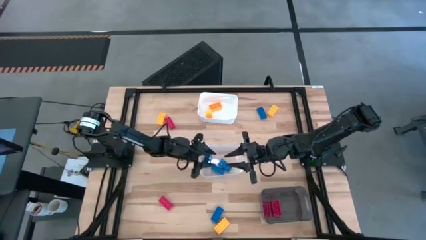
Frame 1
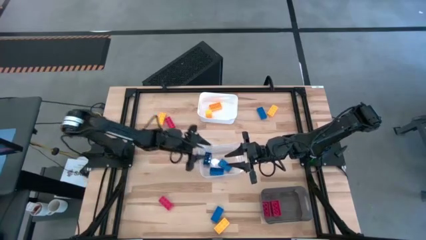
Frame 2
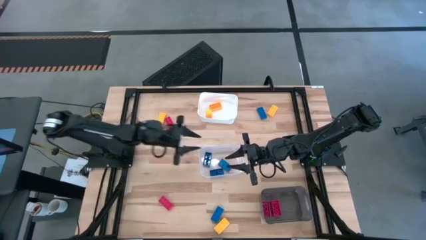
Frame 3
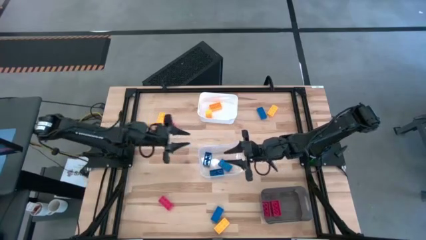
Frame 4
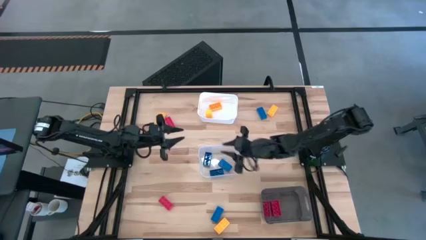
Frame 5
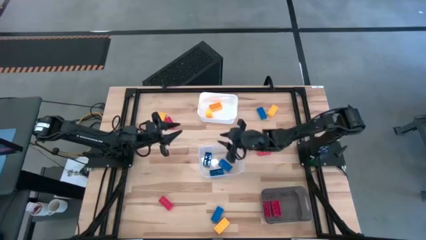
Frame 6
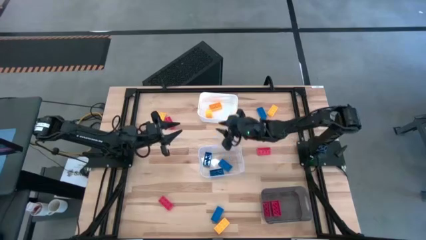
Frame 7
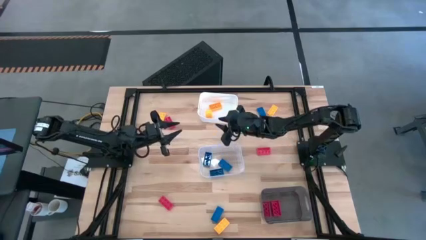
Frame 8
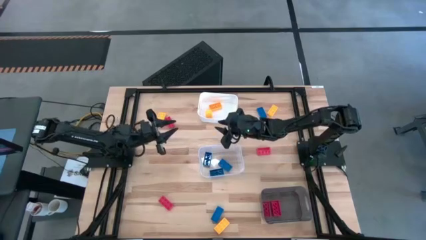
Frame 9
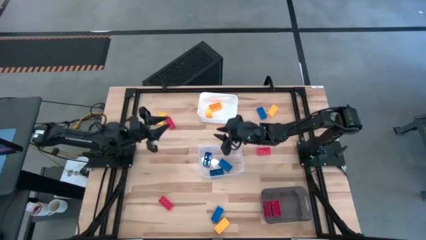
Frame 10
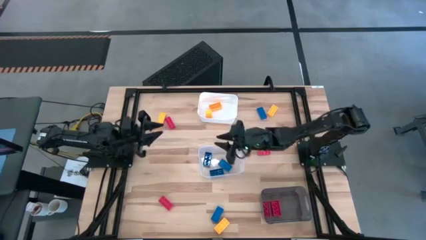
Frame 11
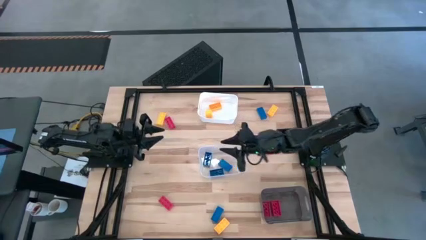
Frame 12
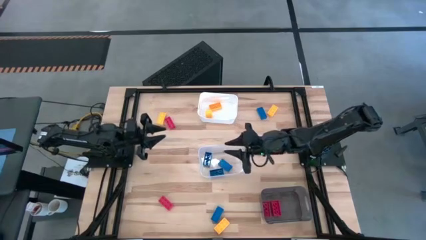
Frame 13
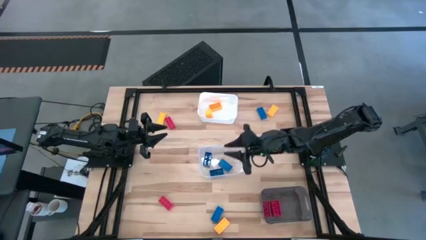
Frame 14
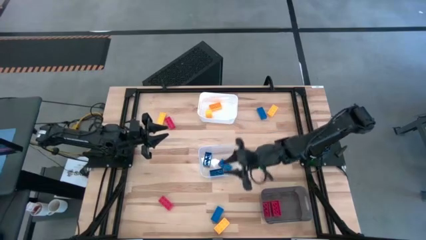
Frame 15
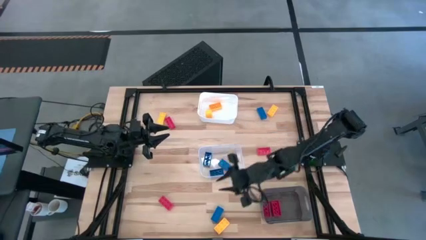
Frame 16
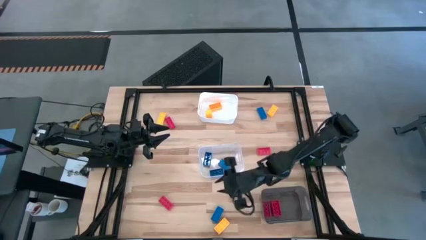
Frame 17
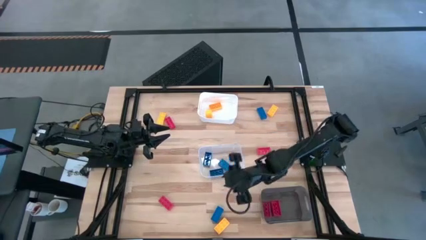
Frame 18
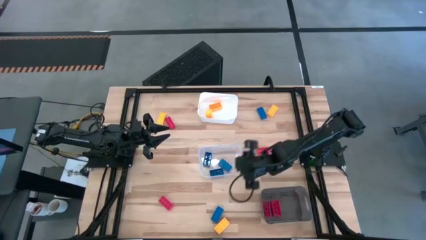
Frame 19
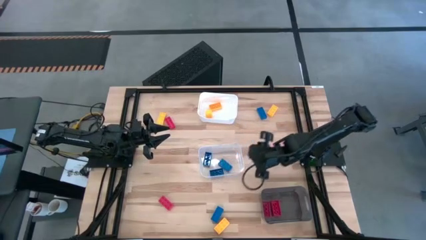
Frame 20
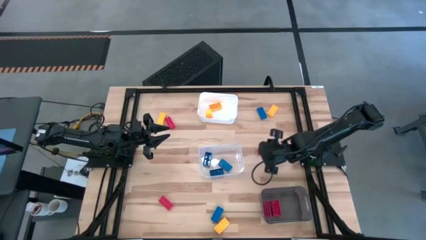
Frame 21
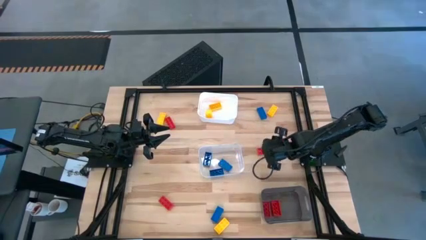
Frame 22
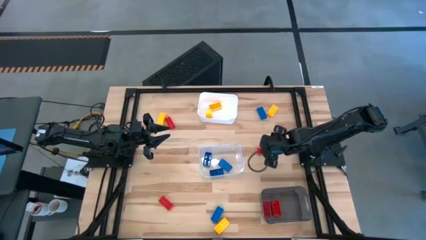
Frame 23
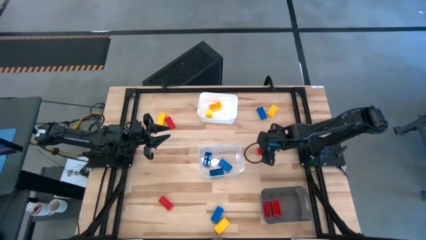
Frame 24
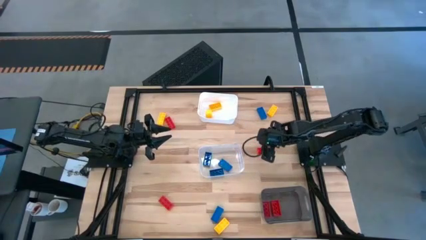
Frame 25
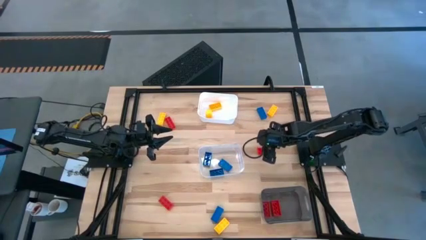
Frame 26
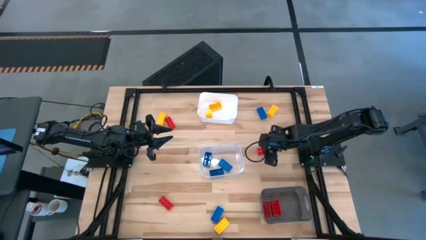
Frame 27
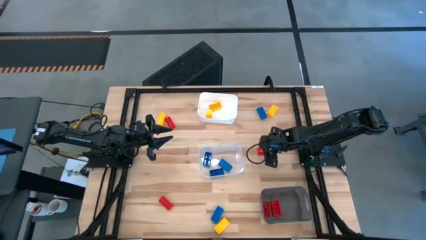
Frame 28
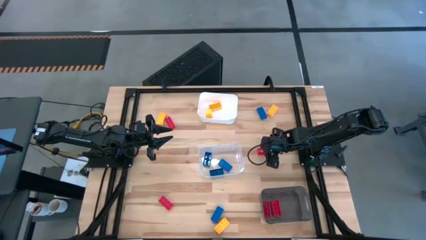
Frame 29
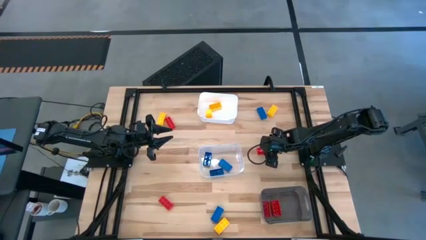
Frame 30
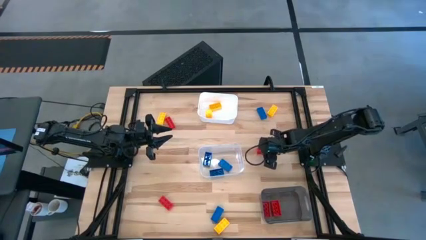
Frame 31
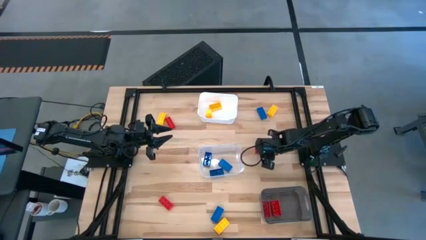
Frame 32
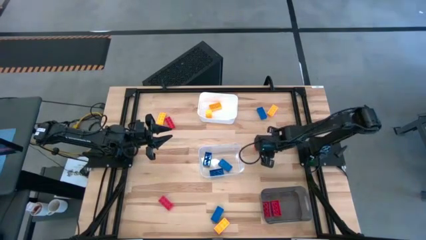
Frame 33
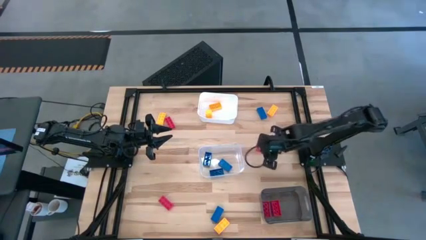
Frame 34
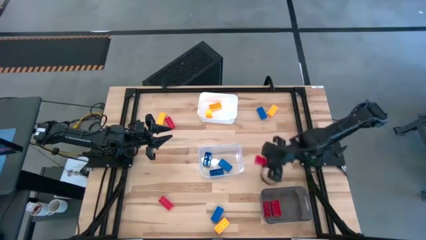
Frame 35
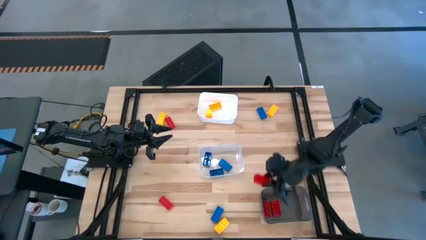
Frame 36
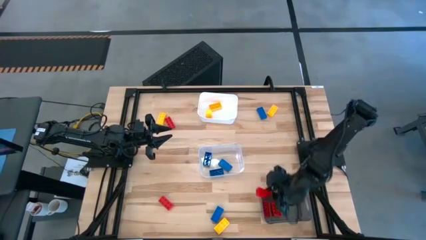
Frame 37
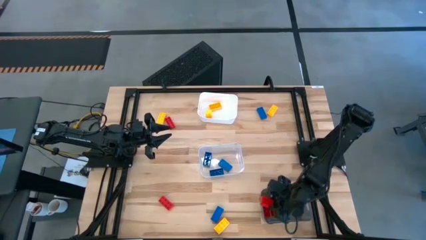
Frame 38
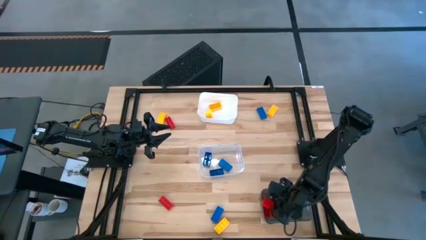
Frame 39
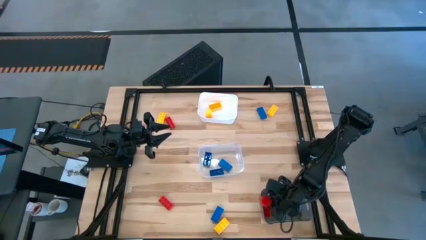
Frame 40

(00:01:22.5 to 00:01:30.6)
Task: Sort & place blocks by color
Put the red game piece into the black bin

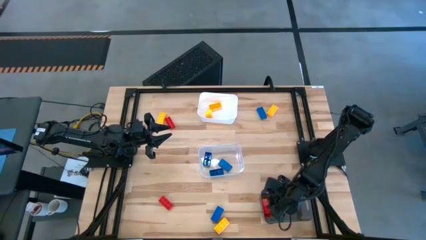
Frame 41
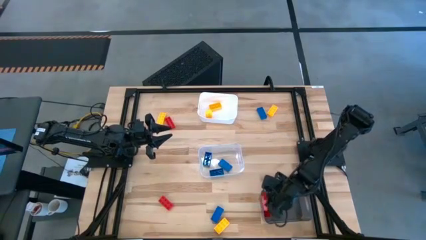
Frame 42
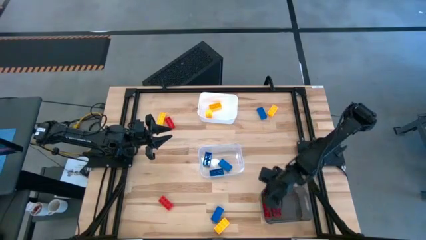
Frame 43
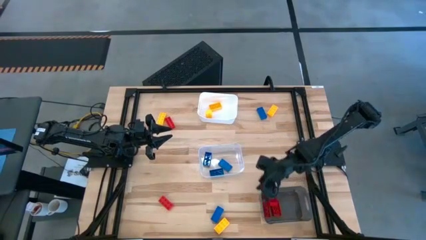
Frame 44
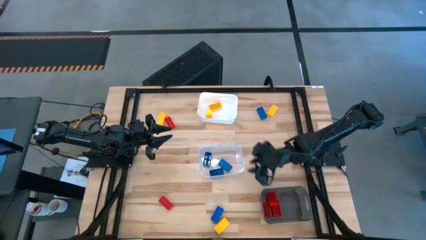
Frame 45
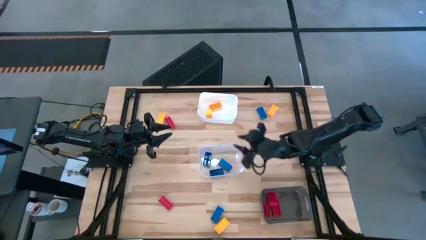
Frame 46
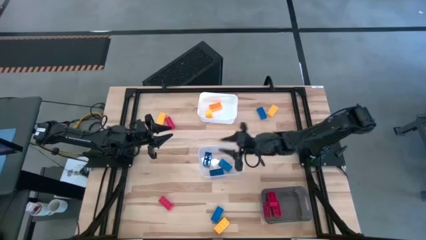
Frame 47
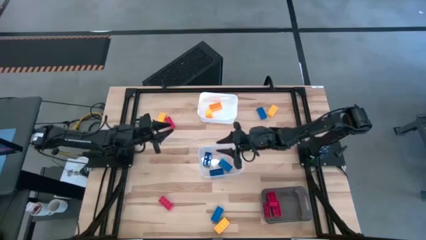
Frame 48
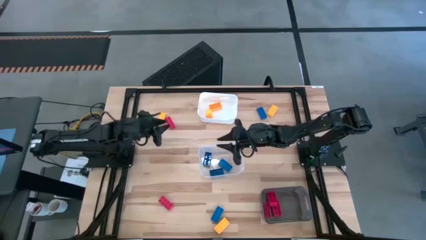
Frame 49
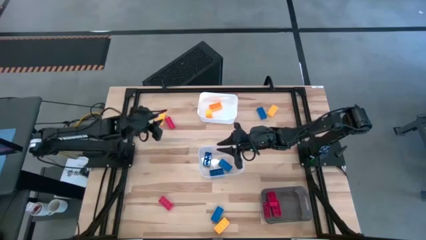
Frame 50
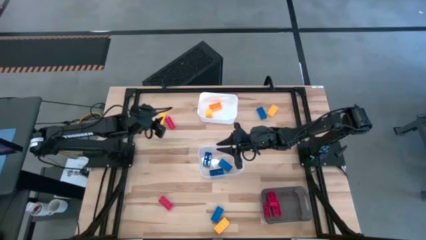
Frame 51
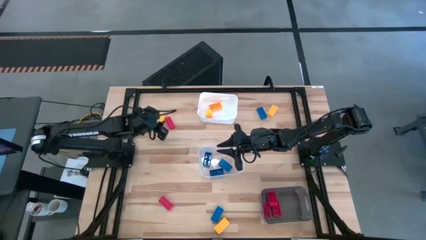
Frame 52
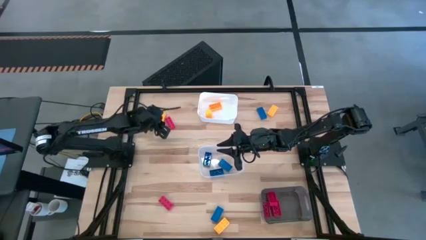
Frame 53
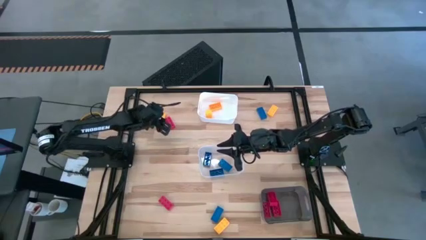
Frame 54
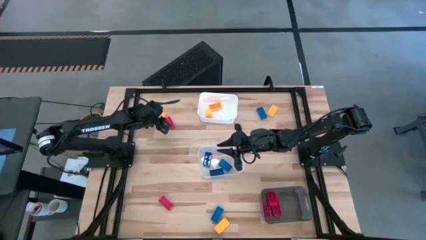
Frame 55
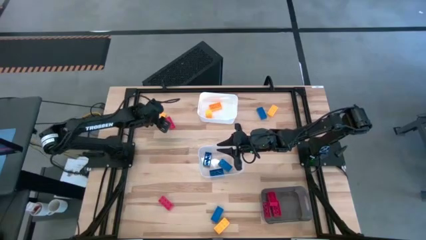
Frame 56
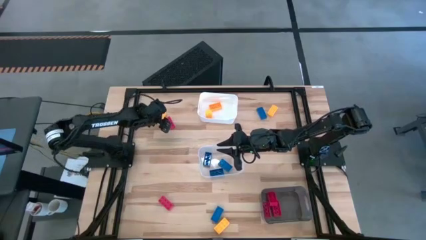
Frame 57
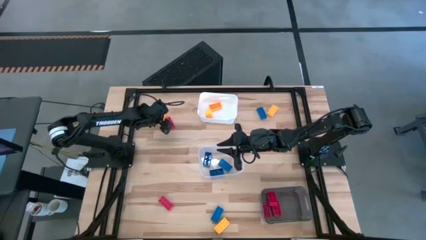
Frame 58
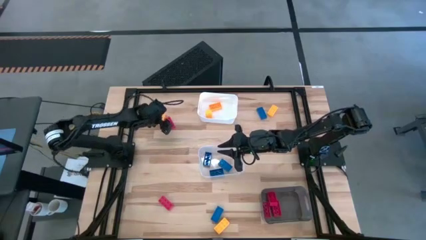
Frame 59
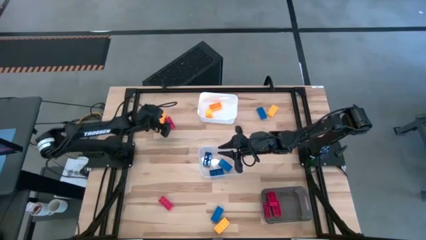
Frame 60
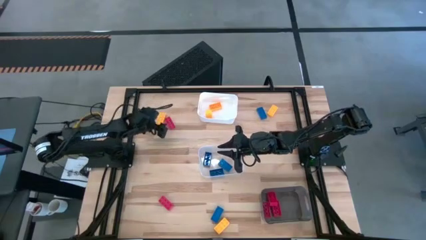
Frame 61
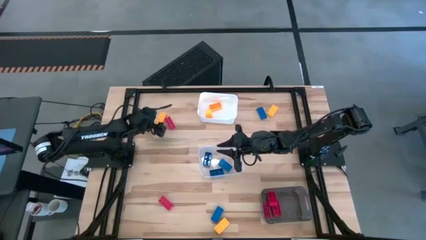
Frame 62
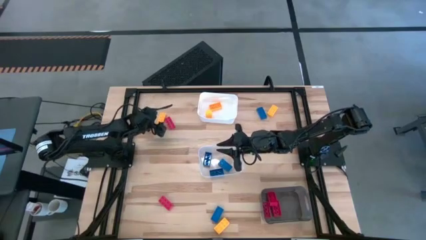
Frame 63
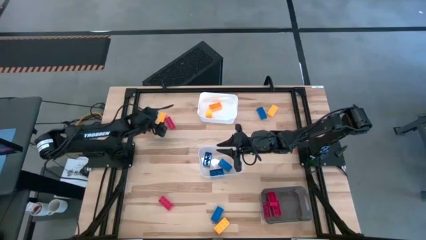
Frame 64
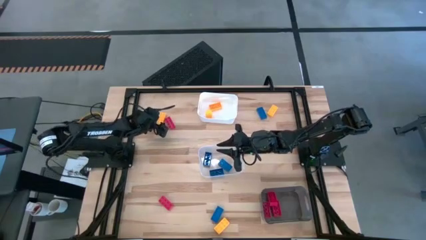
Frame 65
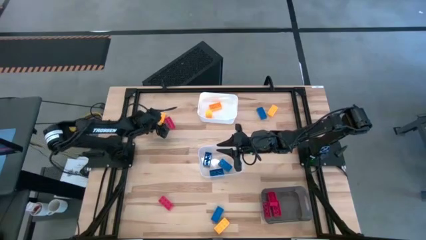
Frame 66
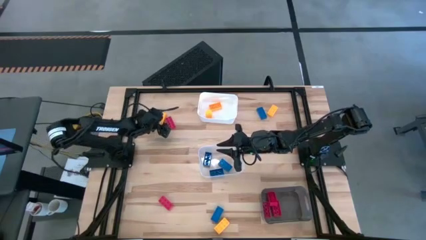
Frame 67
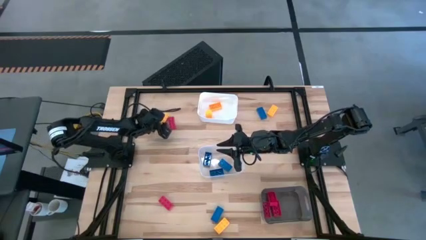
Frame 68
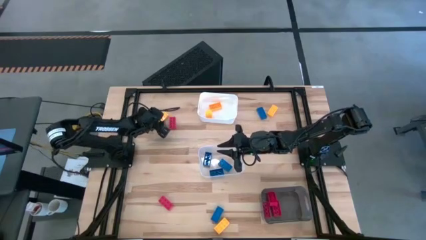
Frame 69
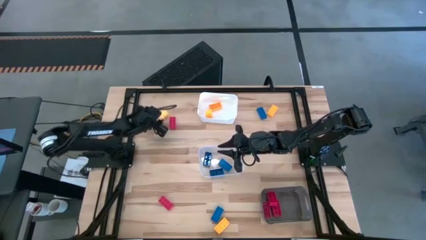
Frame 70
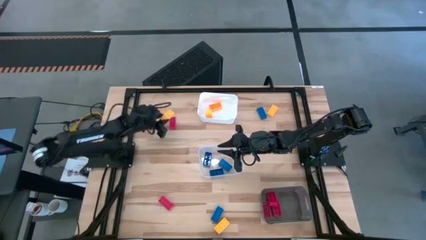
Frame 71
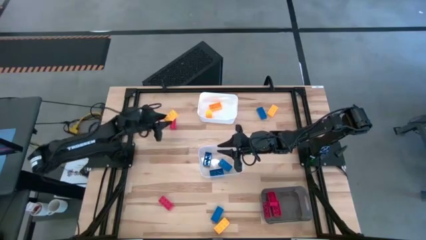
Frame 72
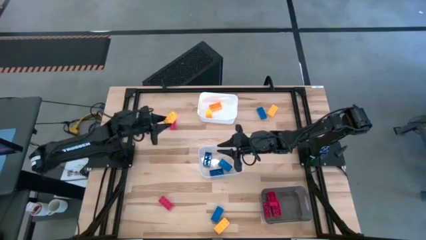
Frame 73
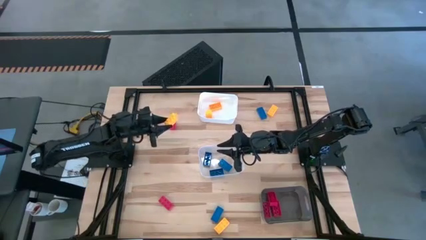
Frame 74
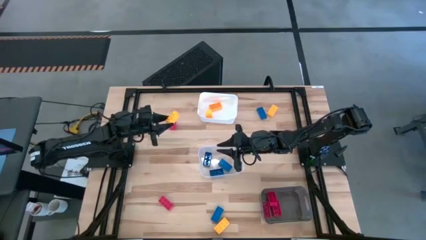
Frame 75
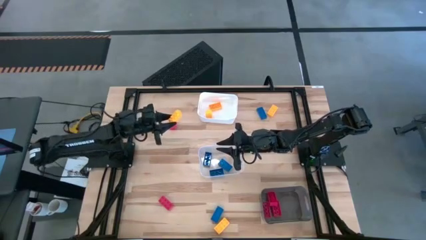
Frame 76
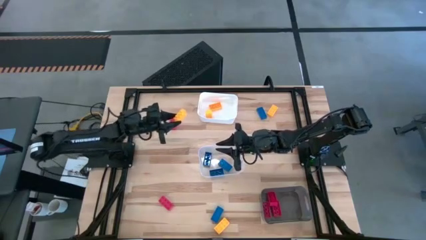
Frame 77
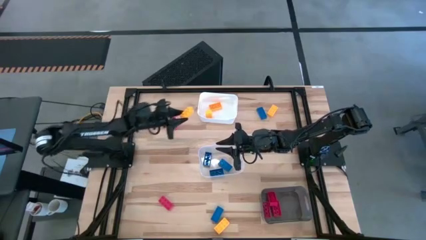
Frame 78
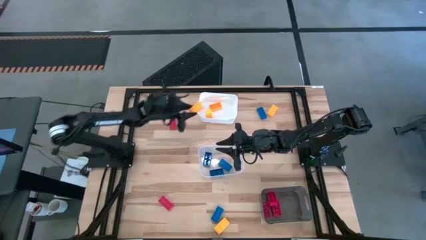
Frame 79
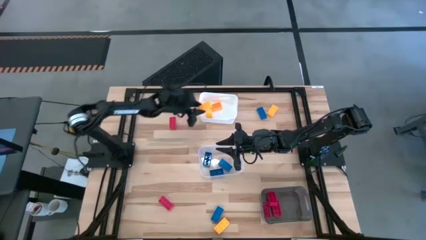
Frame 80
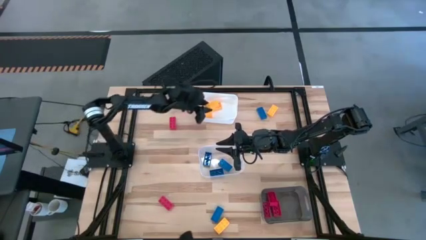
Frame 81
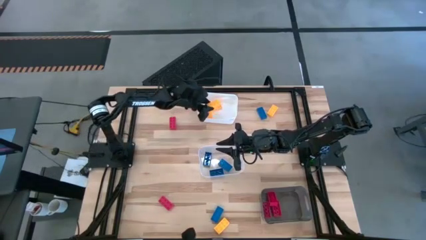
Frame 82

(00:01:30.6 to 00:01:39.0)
Put the yellow game piece into the white bin
